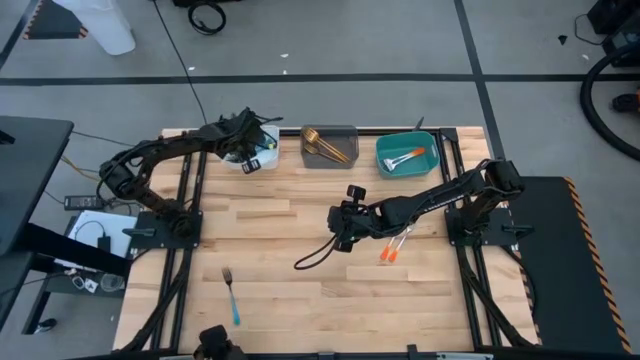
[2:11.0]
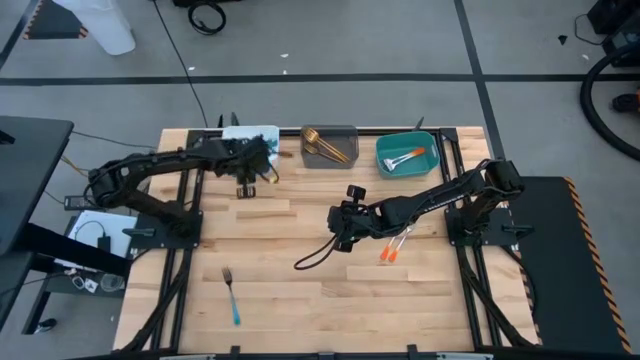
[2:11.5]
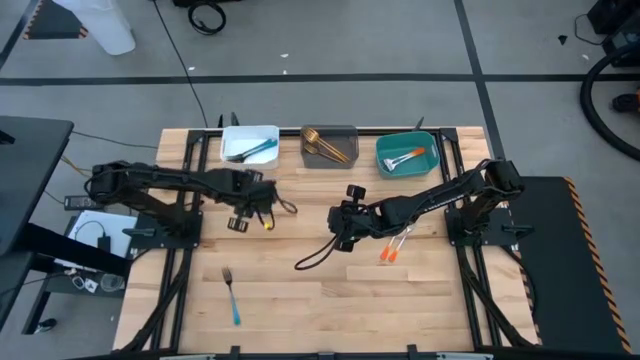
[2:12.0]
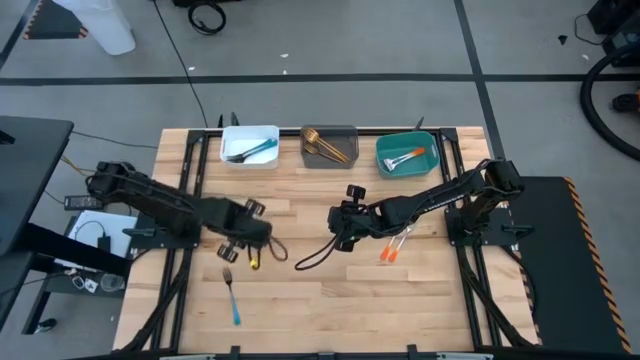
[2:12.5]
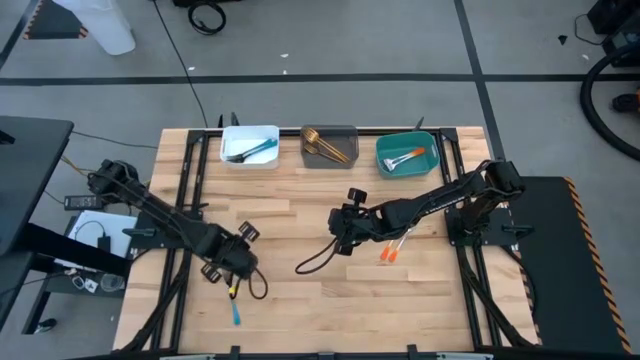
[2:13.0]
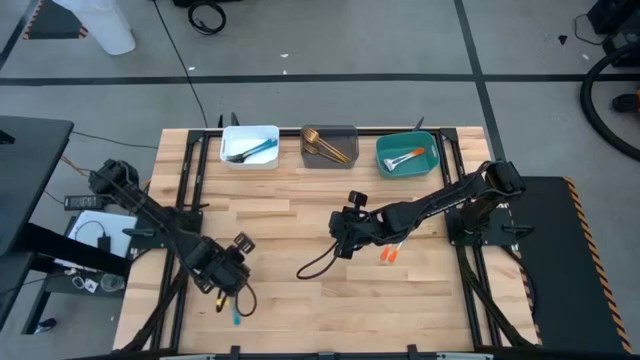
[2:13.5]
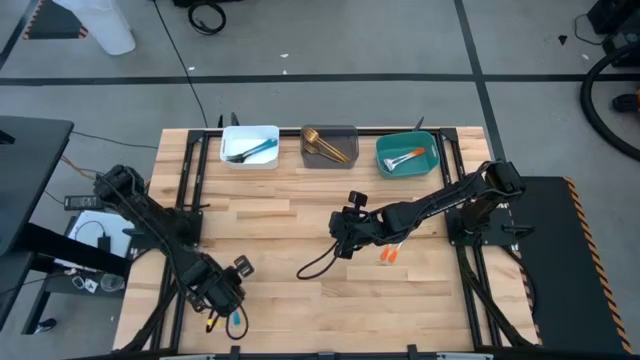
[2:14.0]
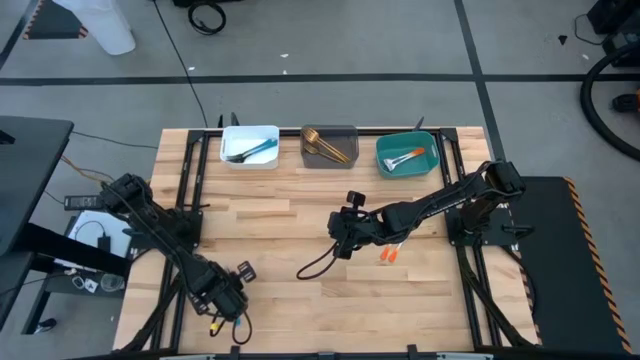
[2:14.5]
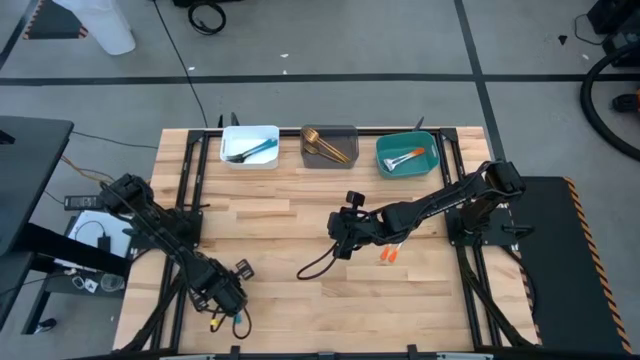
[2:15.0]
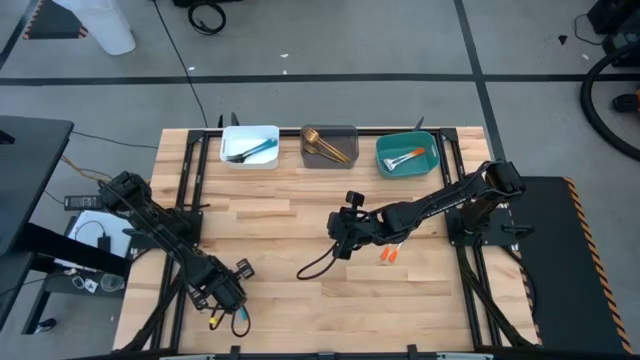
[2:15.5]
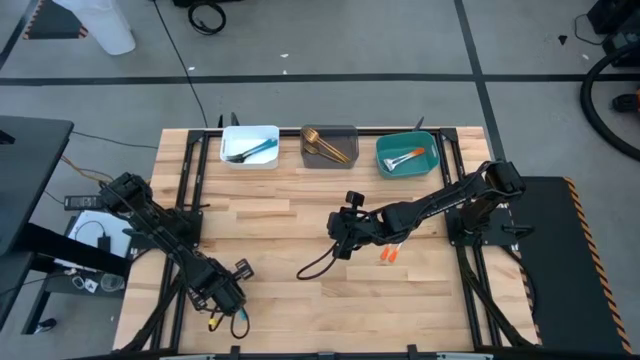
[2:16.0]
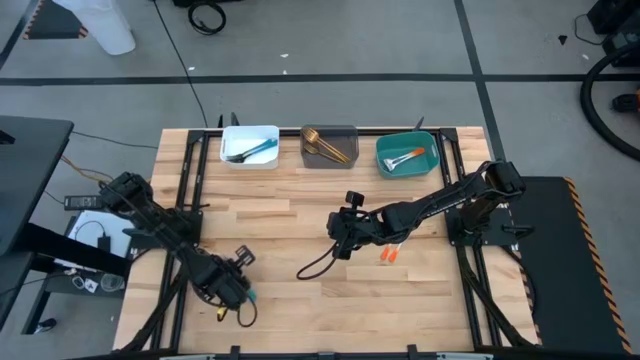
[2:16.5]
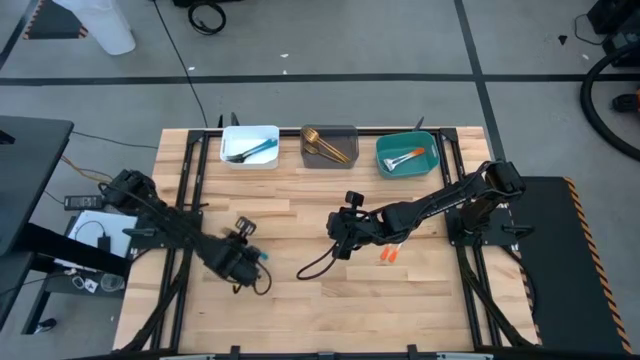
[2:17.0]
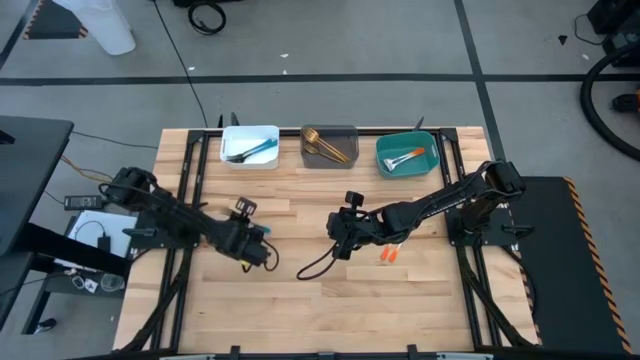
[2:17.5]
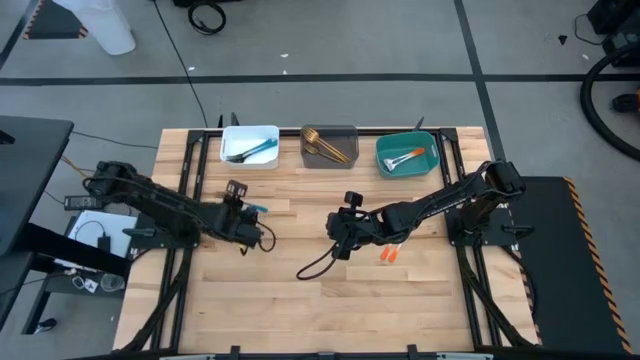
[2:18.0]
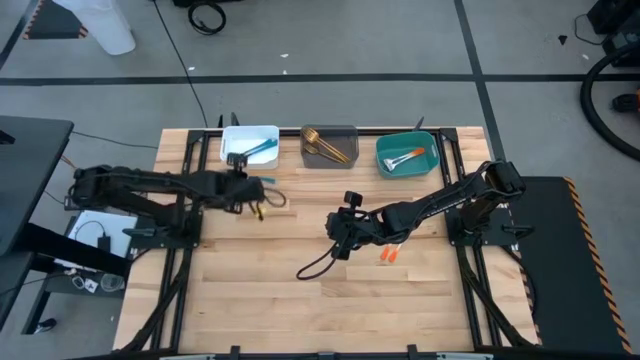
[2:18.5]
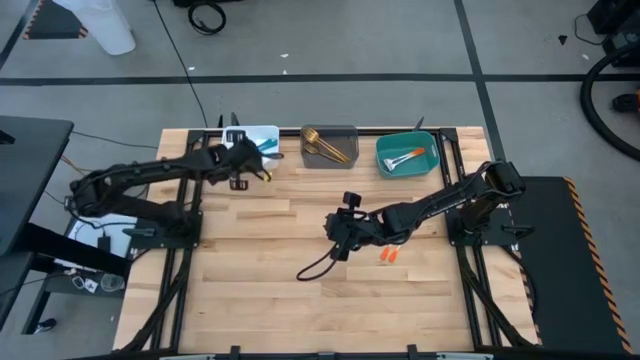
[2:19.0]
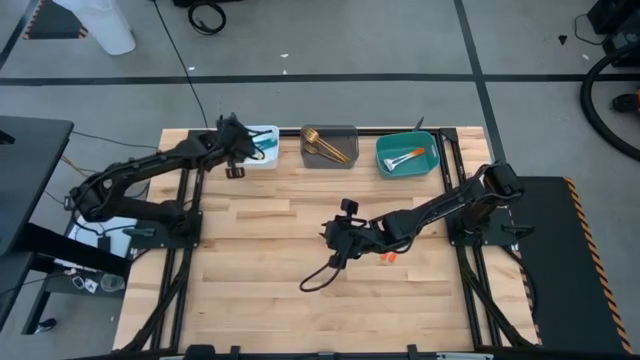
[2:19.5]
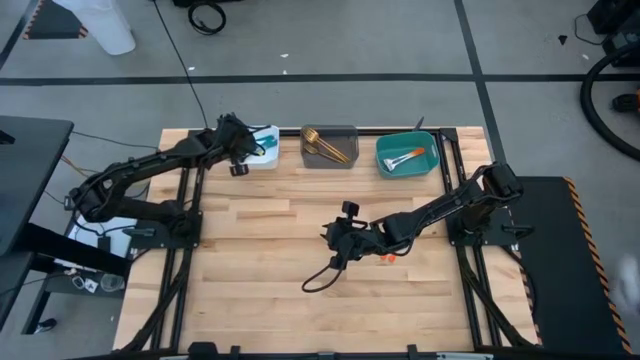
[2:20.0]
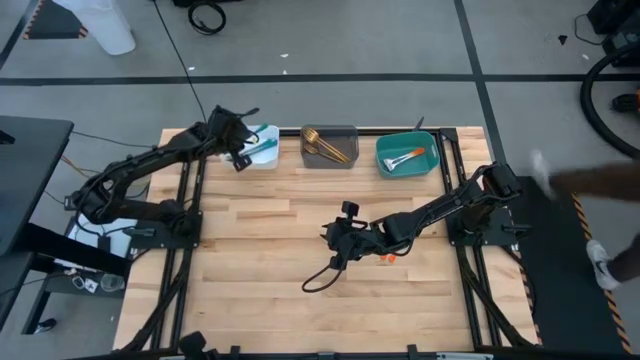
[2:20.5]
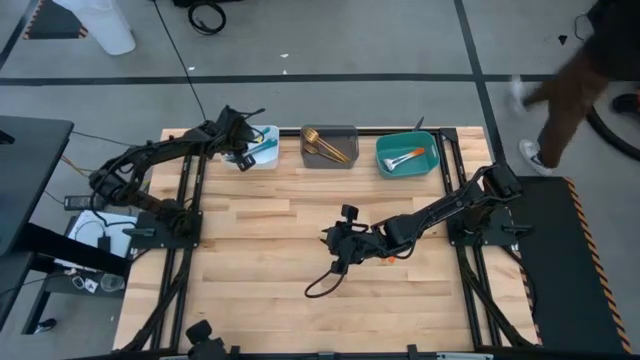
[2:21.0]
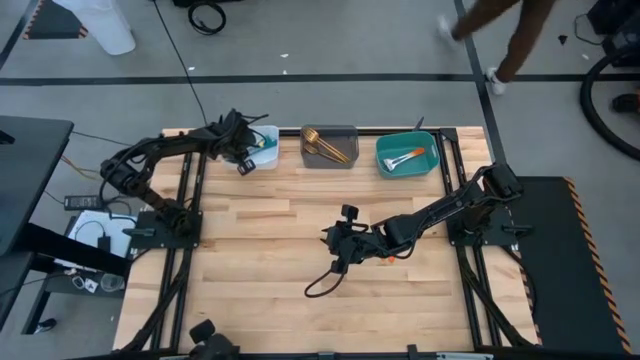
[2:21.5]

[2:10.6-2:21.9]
Task: Sort silverware by color (type)
Put the blue fork into the white bin

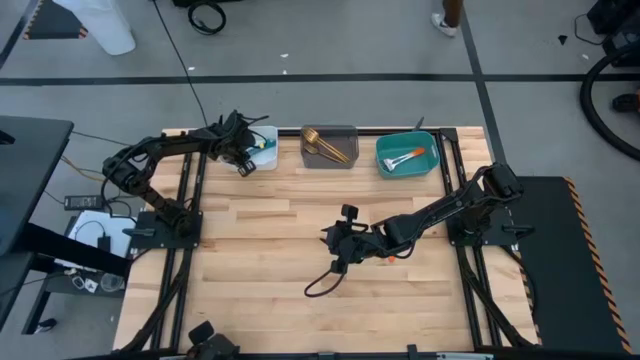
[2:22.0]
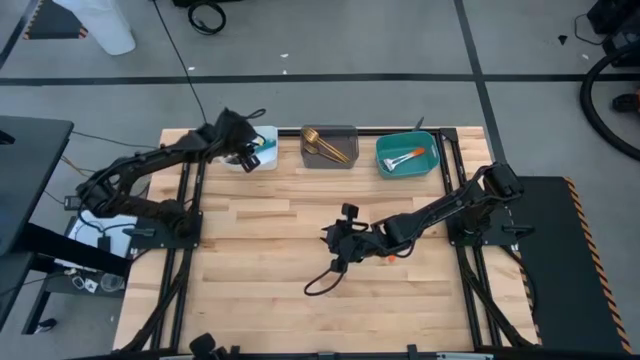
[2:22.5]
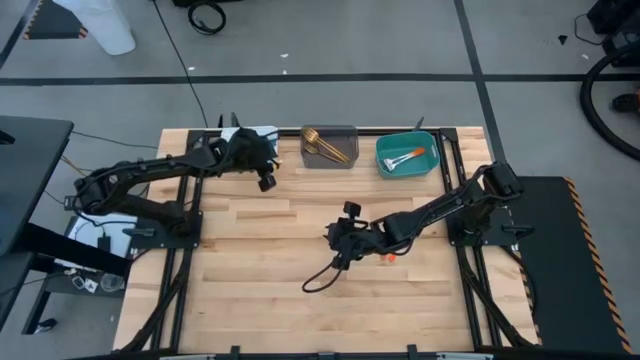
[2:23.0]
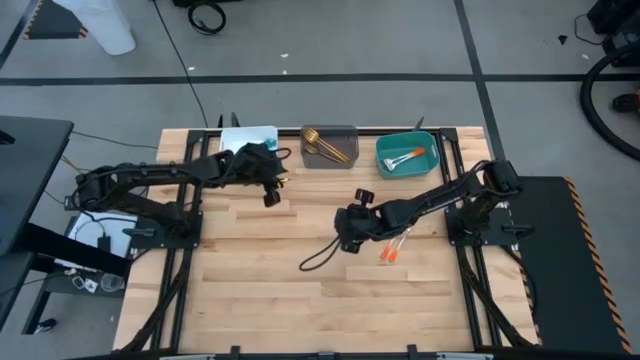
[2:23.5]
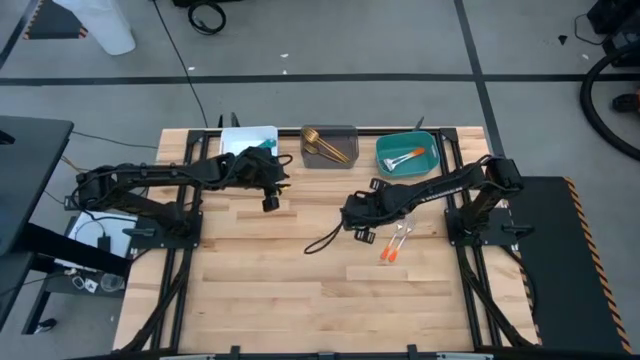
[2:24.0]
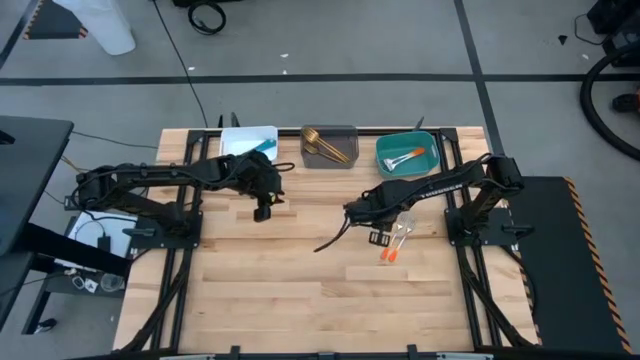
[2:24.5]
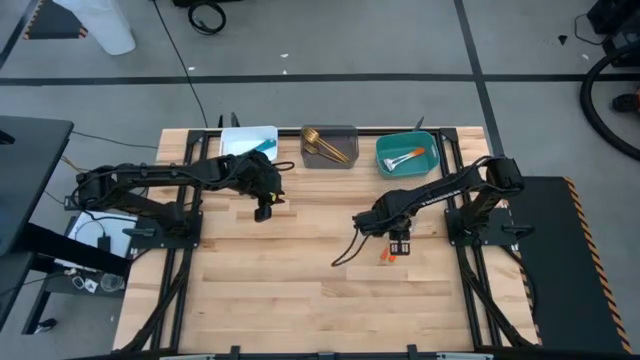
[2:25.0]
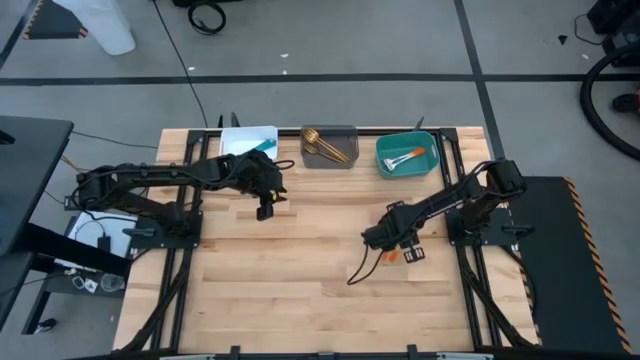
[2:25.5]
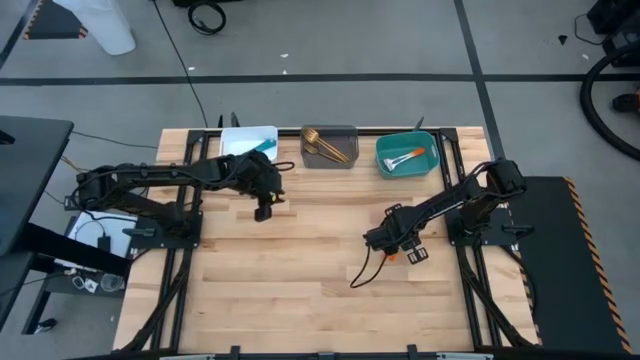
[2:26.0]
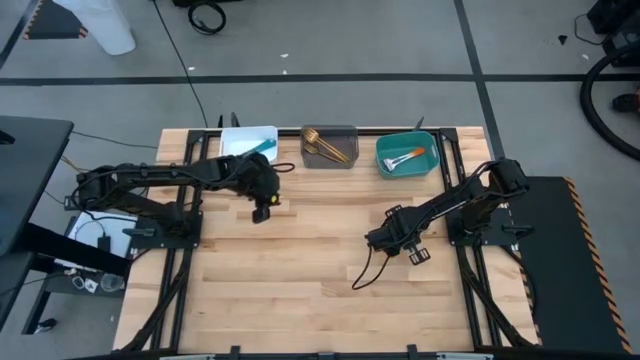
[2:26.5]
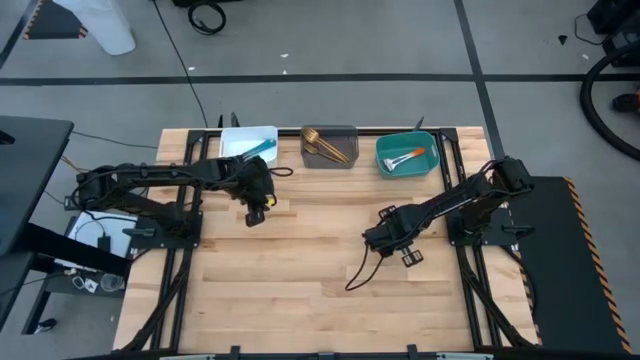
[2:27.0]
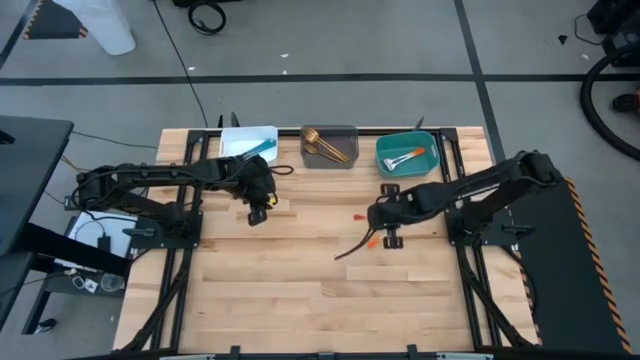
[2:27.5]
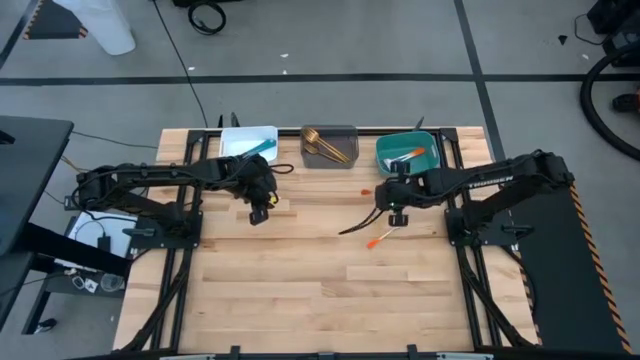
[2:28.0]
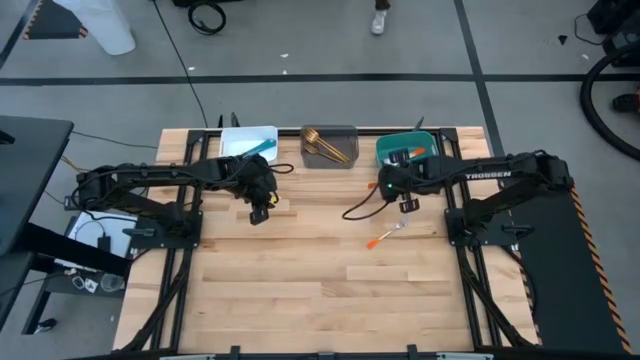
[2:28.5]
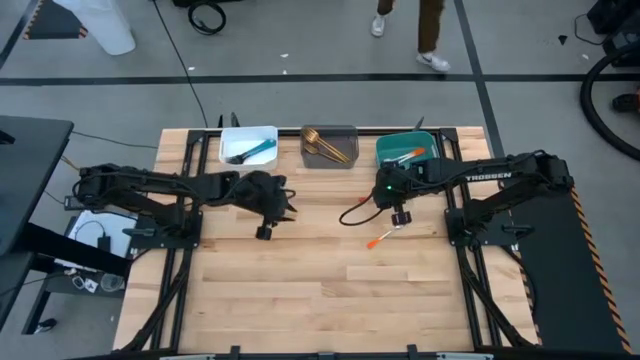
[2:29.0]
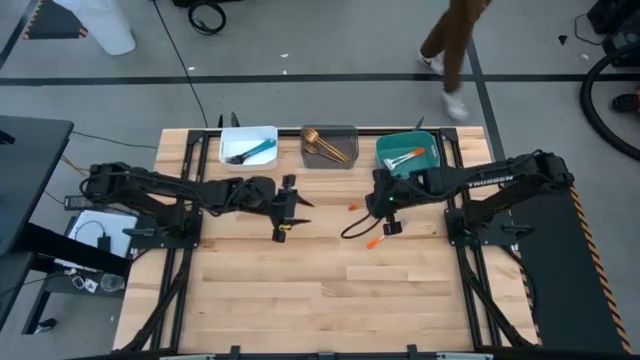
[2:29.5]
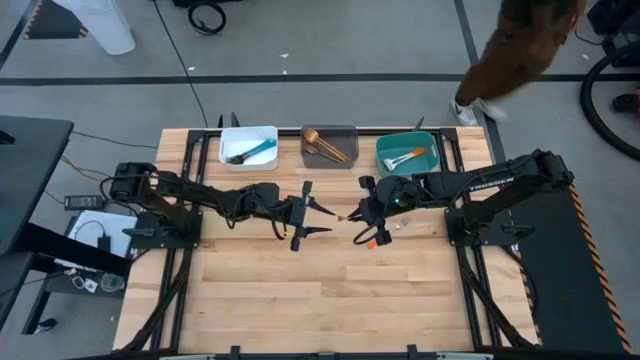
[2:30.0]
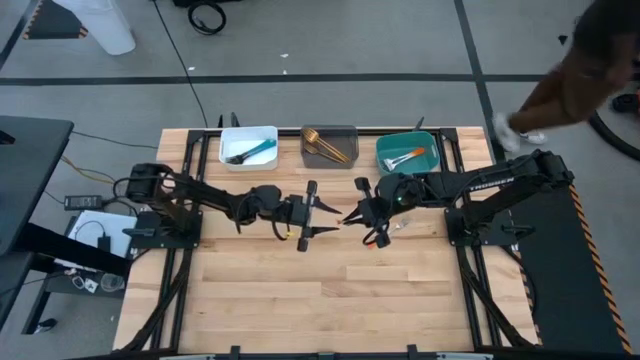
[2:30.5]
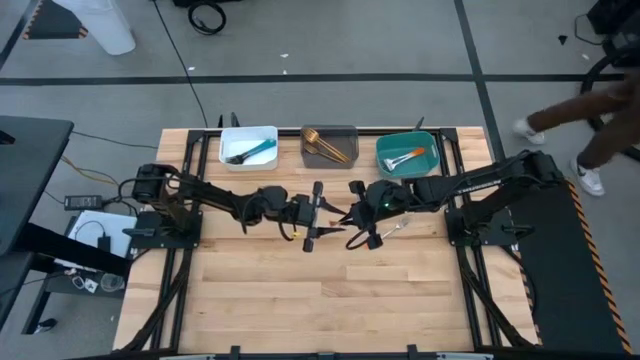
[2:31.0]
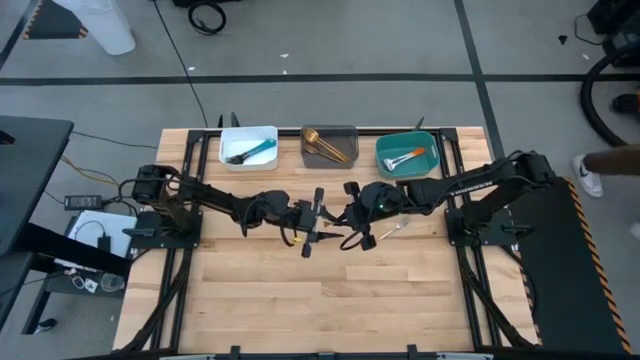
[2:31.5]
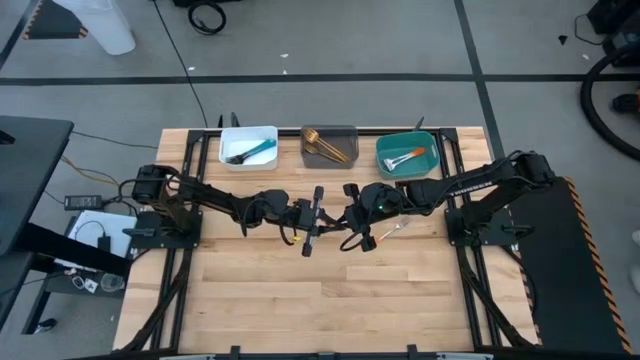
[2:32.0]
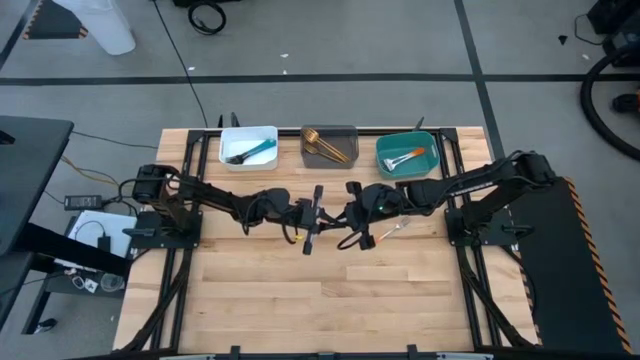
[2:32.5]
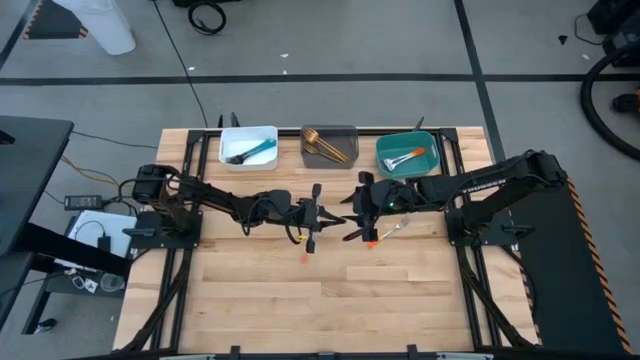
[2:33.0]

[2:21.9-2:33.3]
Put the right orange fork into the green bin
